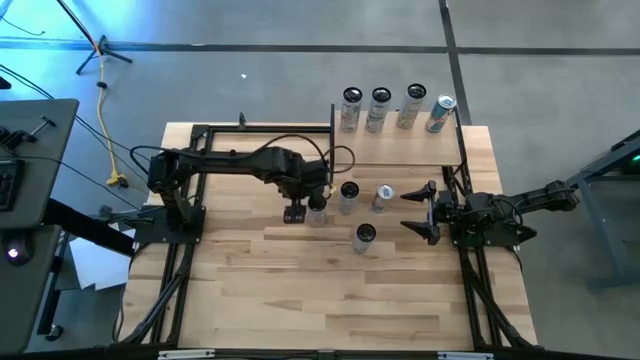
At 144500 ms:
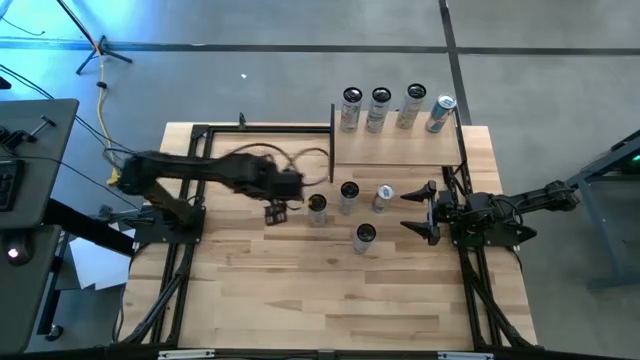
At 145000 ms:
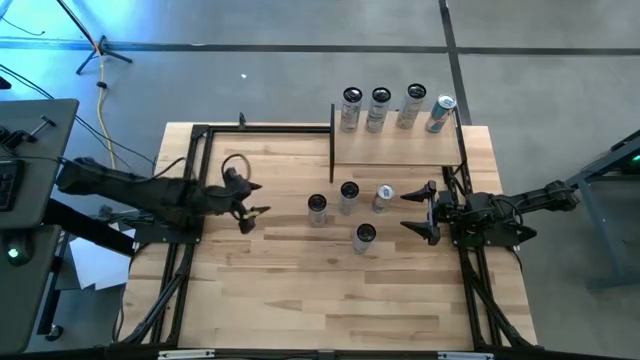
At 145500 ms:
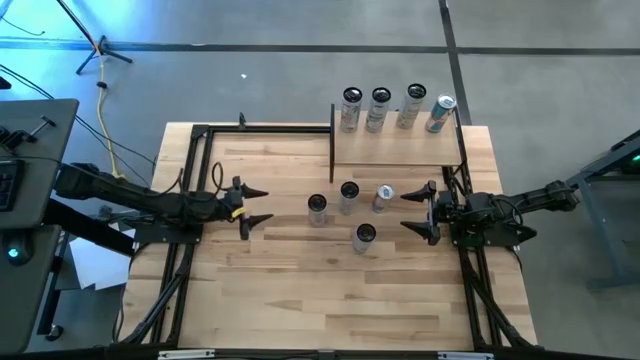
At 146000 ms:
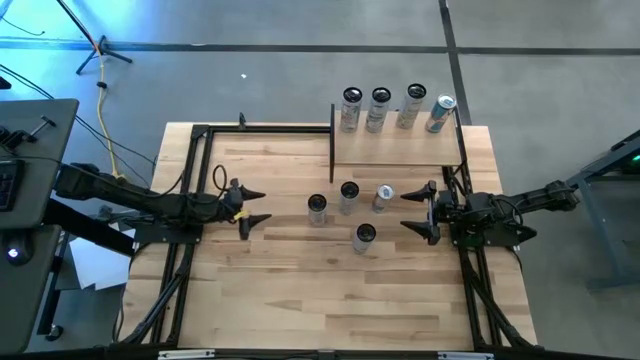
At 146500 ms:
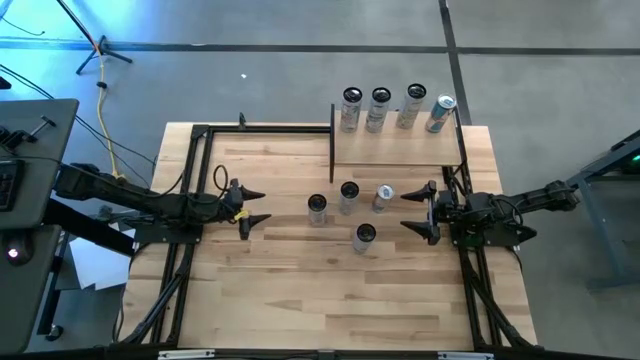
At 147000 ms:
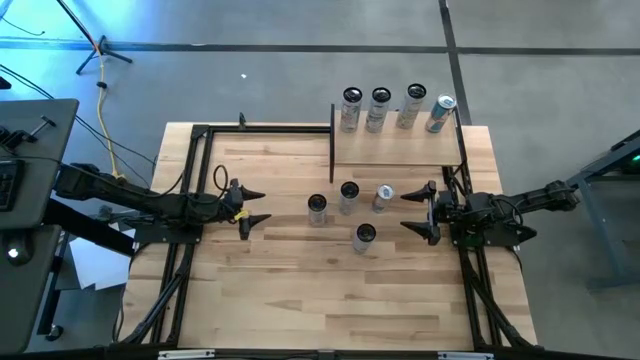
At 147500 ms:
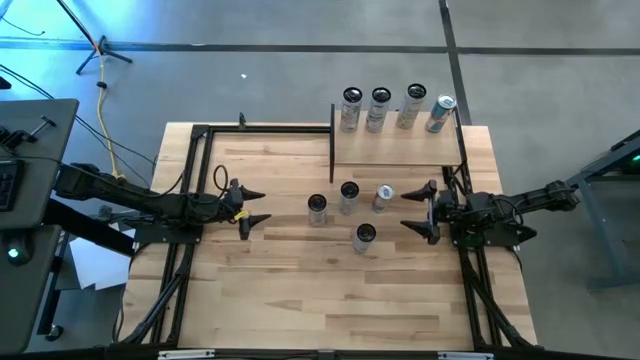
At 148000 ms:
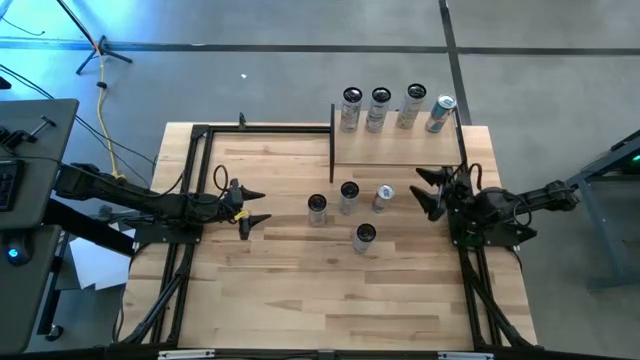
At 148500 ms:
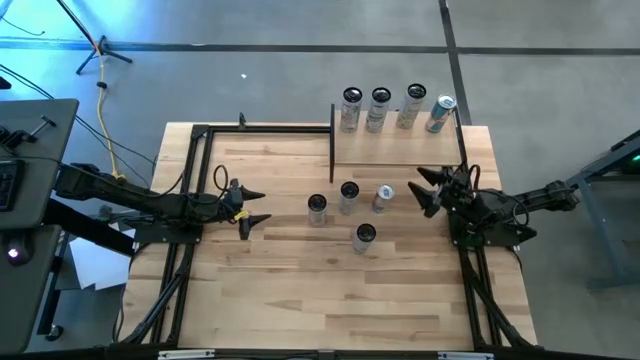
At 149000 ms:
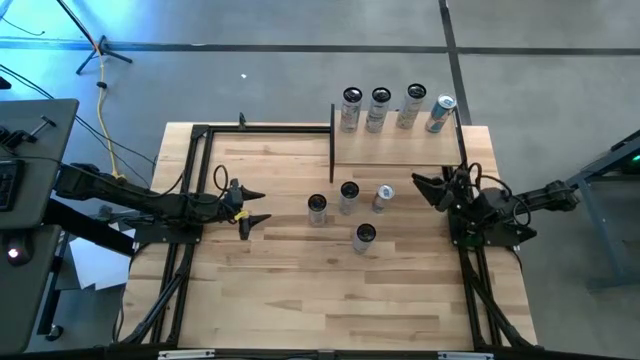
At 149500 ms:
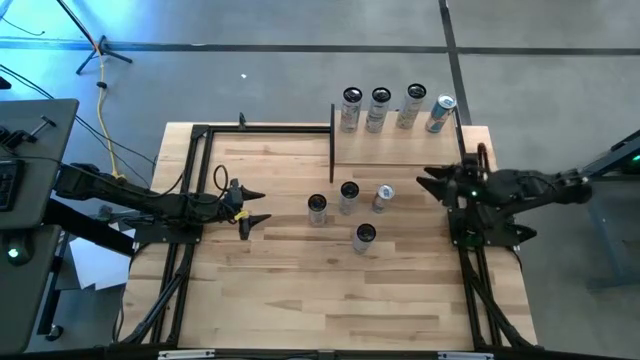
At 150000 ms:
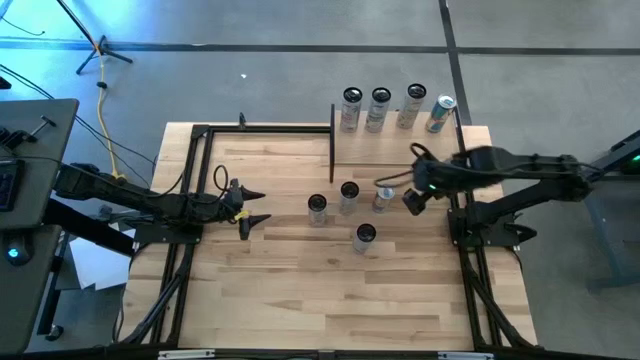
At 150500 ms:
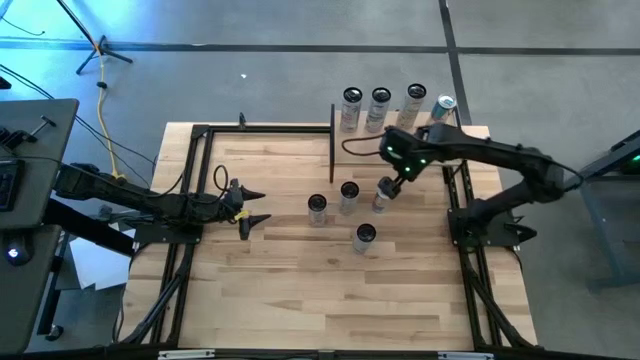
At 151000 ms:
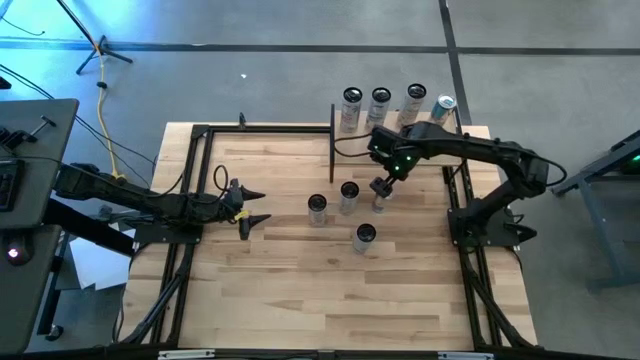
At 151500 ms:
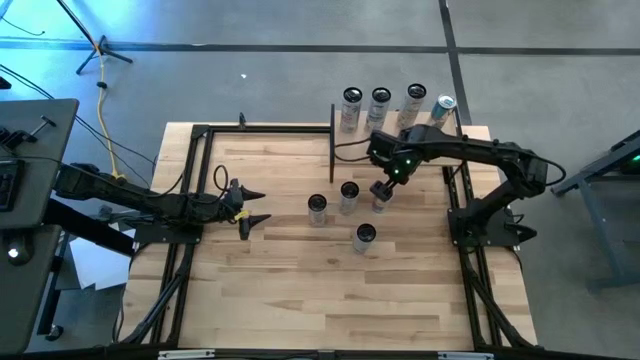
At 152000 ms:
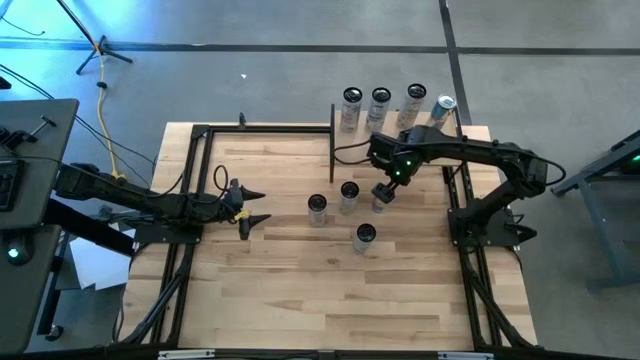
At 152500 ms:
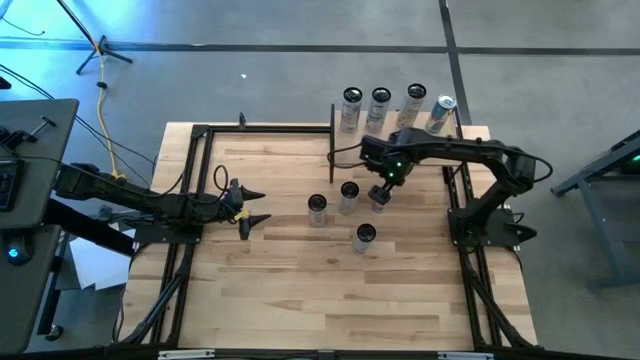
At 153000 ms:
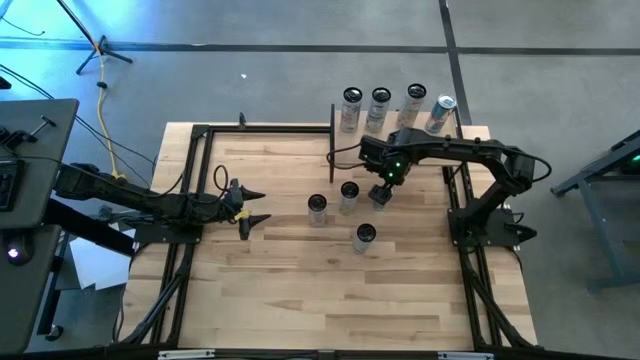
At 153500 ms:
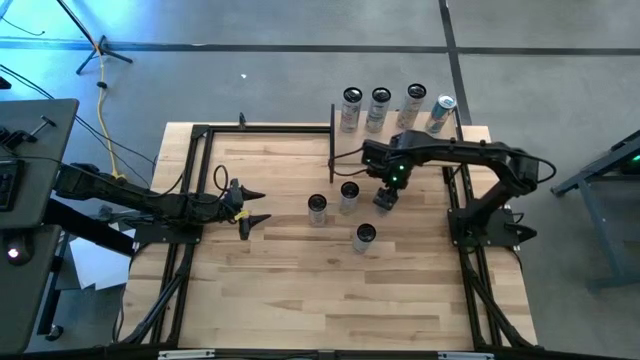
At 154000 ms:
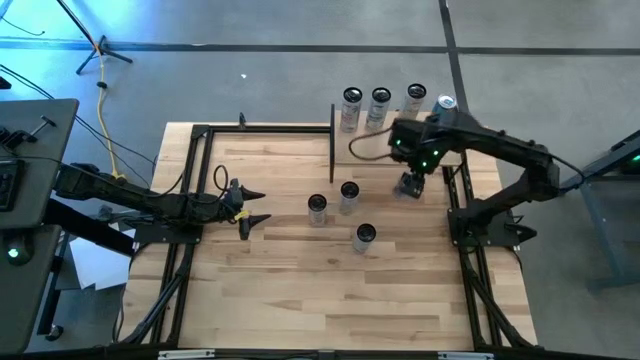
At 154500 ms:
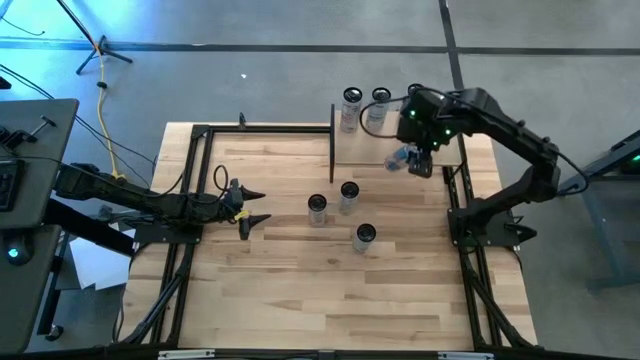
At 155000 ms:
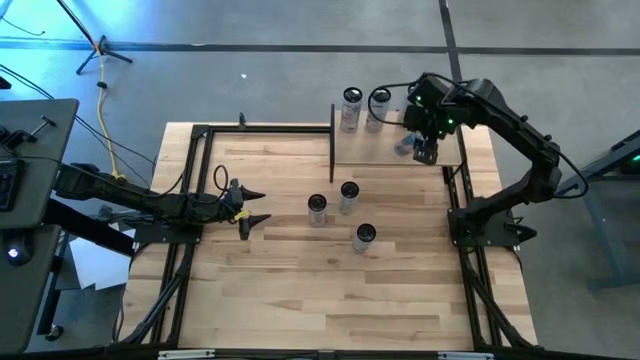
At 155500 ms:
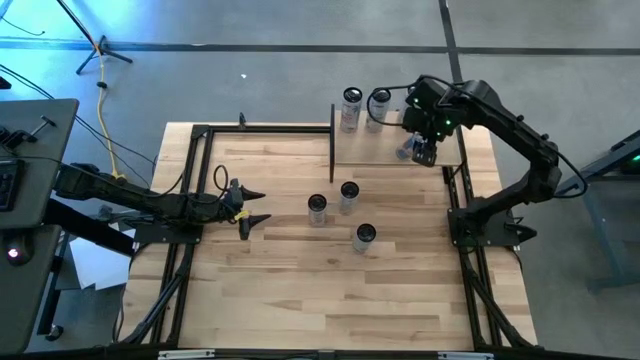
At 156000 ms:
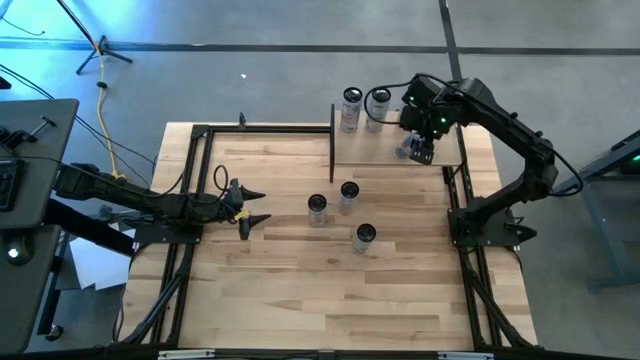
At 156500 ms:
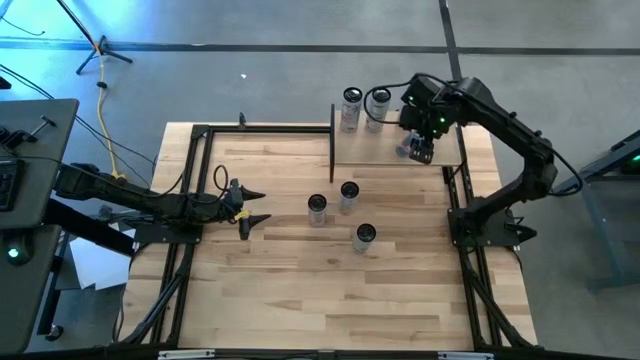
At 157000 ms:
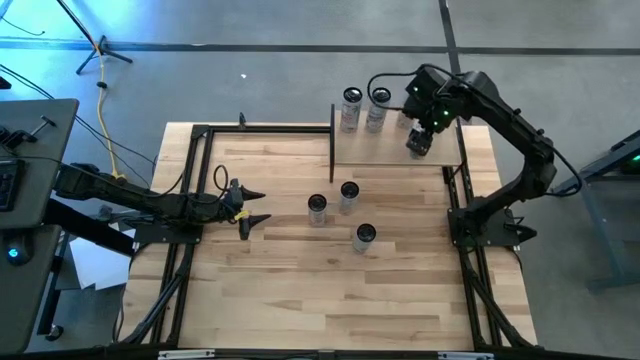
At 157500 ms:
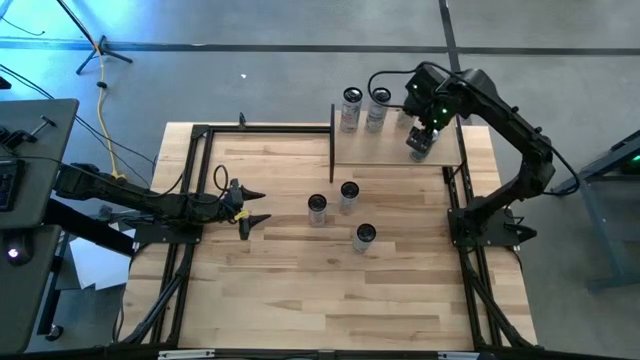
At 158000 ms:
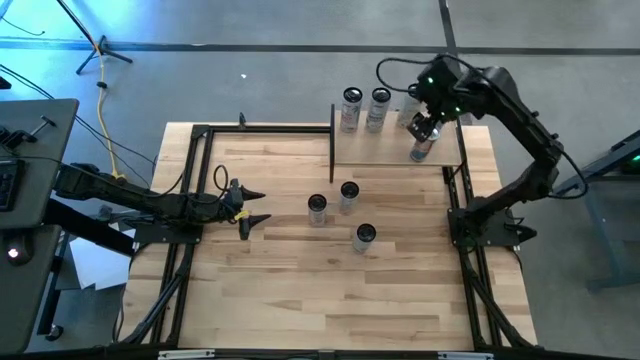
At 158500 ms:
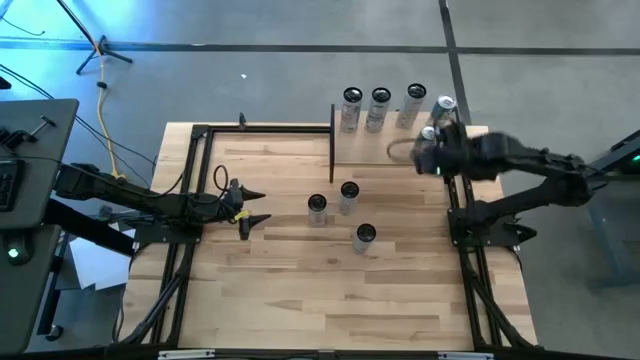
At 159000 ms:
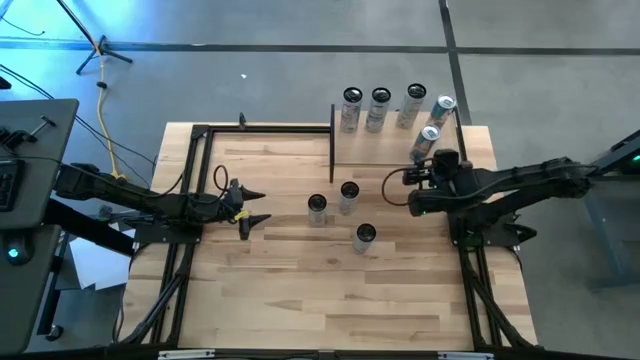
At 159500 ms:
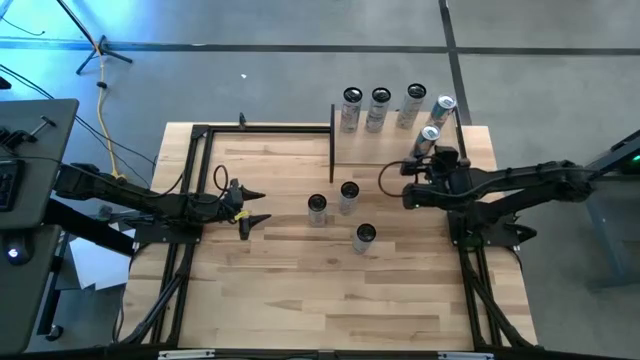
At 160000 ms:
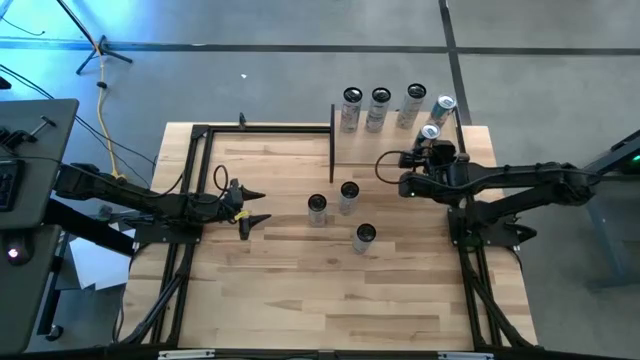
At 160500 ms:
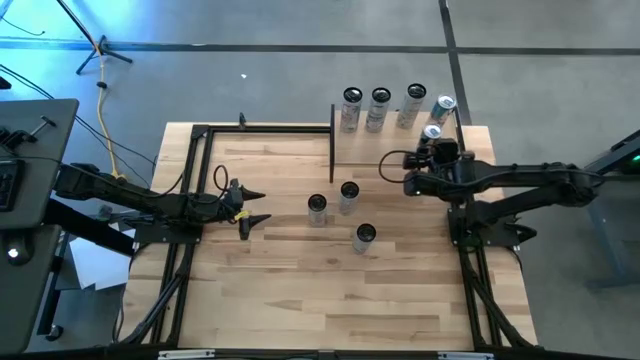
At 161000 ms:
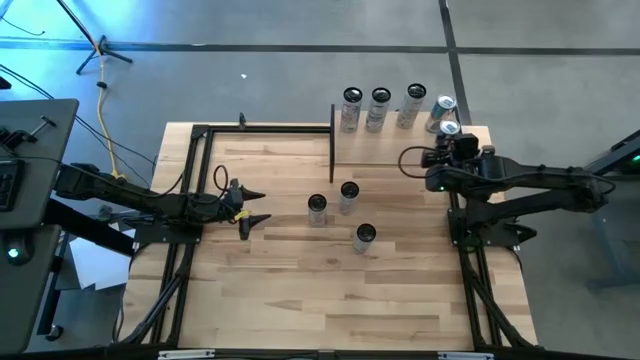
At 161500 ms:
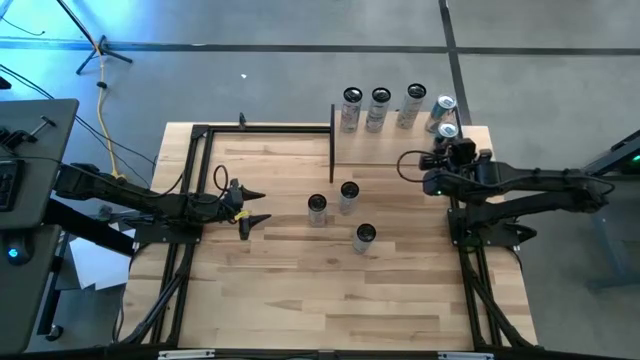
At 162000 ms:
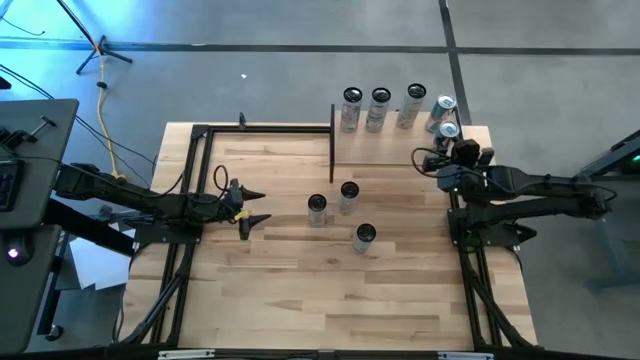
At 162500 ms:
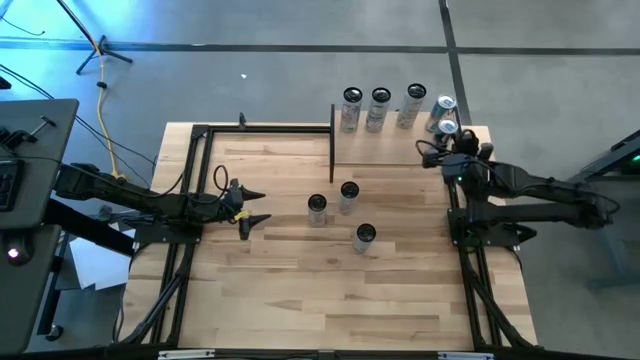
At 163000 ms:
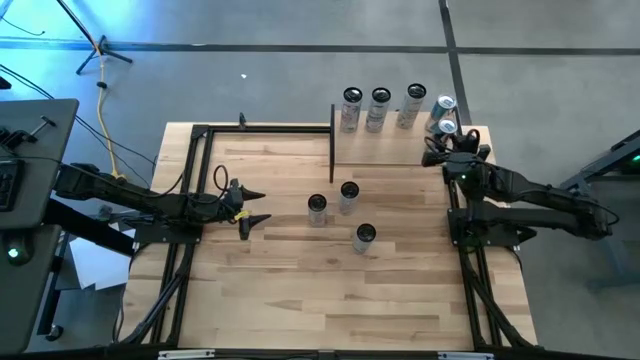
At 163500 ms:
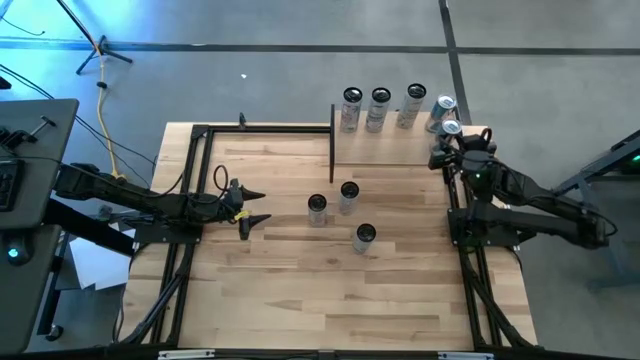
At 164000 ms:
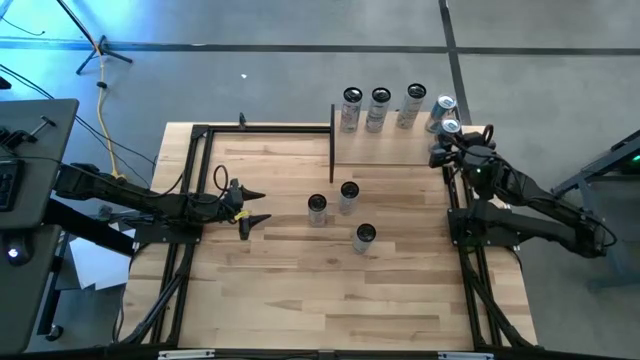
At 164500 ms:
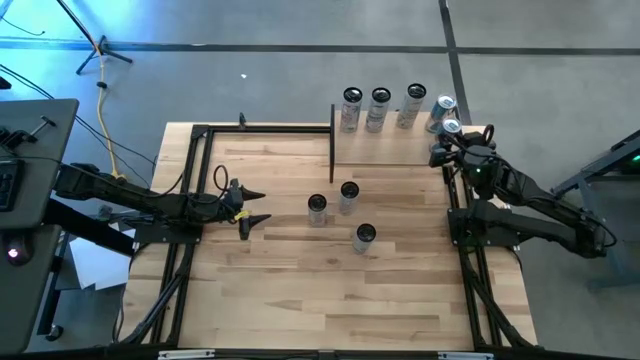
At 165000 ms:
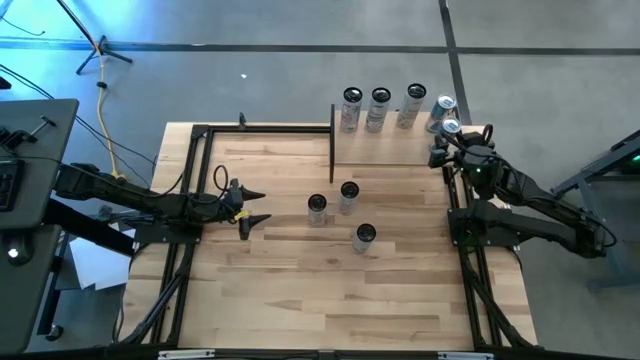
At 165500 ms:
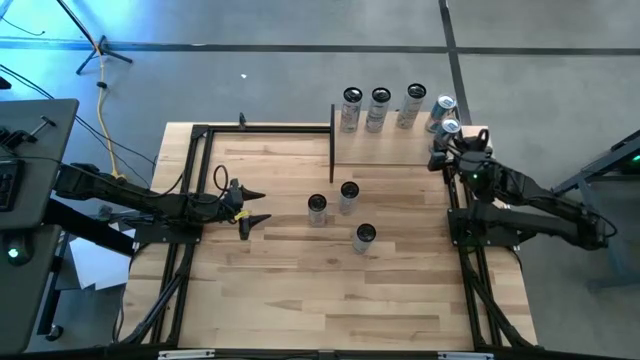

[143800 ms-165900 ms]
Task: Place canned beverage on shelf
Put the blue soda can on the shelf aligned with the blue soda can
